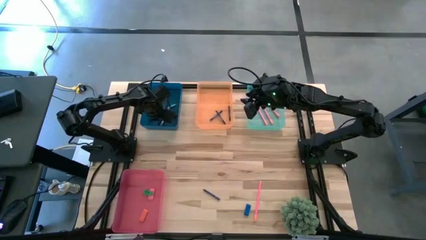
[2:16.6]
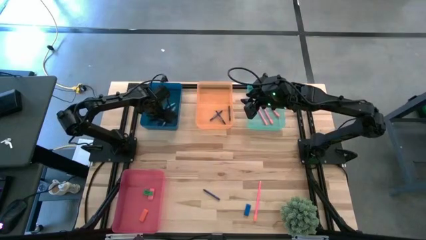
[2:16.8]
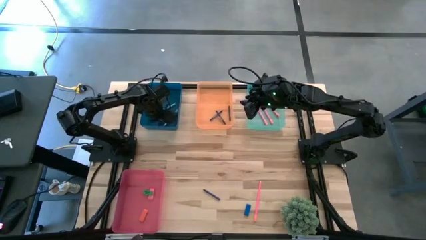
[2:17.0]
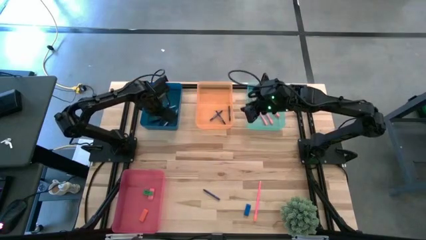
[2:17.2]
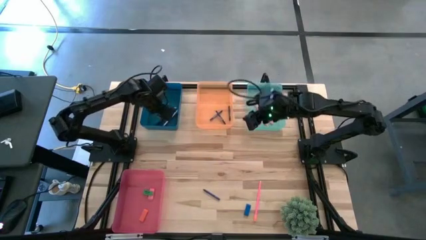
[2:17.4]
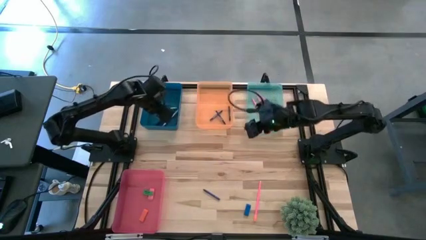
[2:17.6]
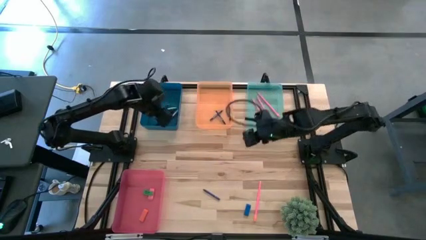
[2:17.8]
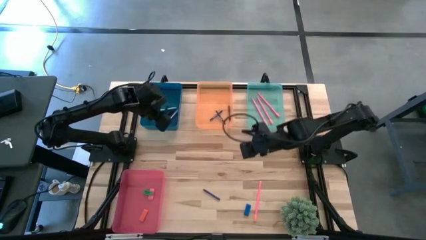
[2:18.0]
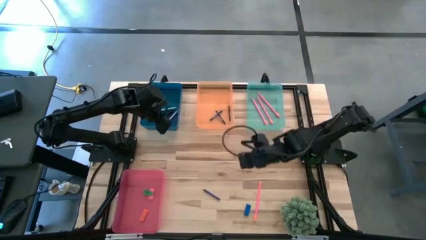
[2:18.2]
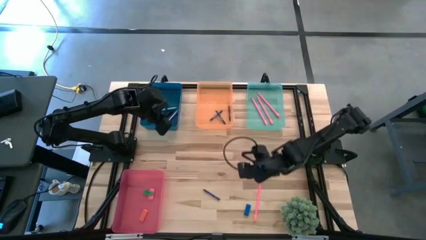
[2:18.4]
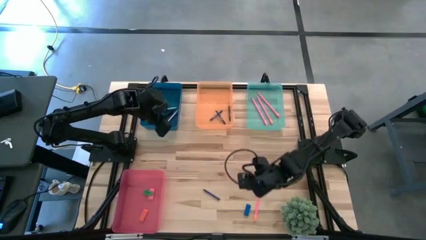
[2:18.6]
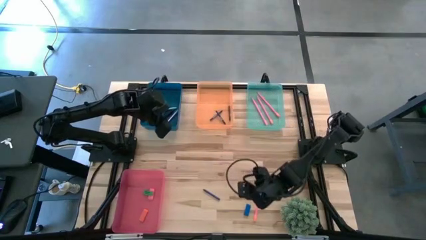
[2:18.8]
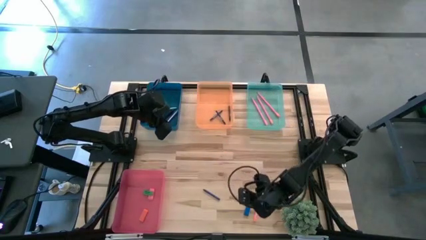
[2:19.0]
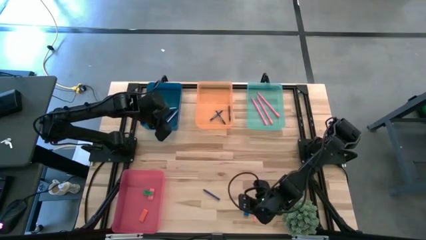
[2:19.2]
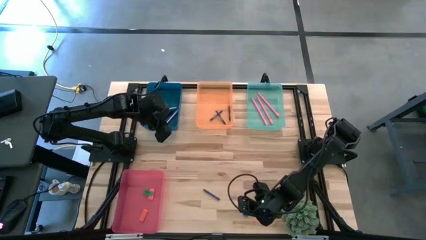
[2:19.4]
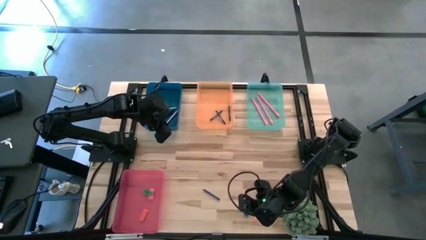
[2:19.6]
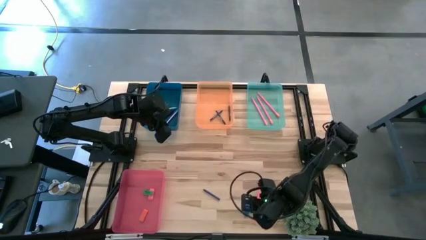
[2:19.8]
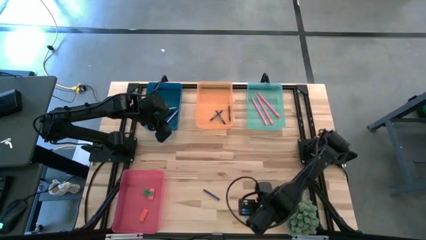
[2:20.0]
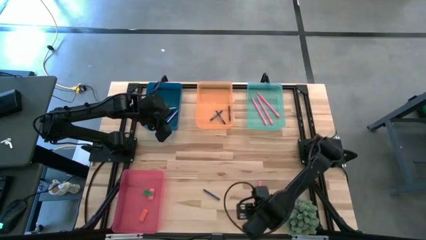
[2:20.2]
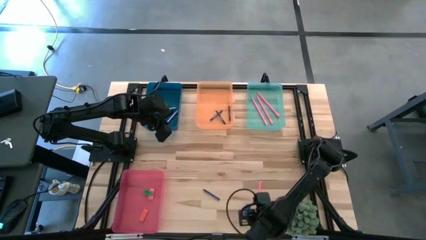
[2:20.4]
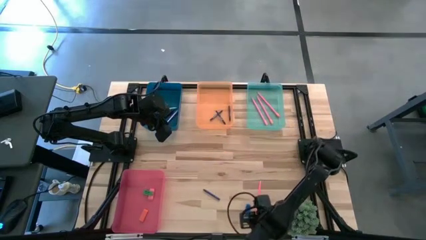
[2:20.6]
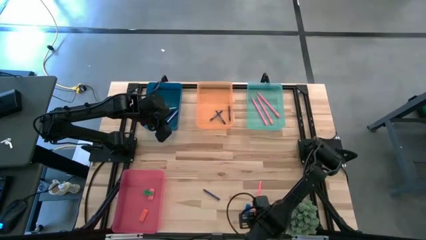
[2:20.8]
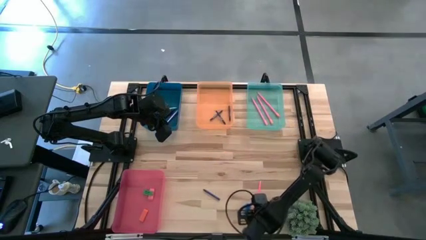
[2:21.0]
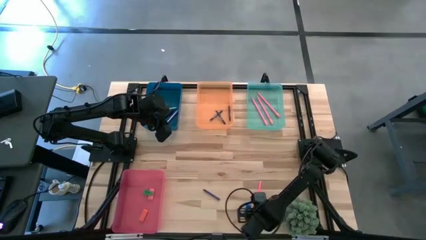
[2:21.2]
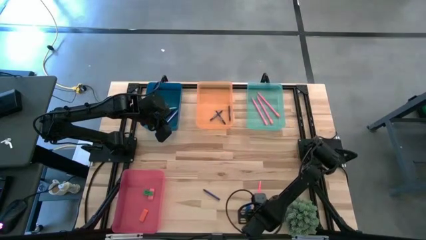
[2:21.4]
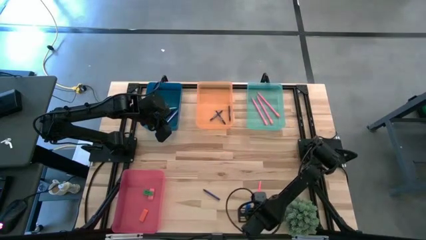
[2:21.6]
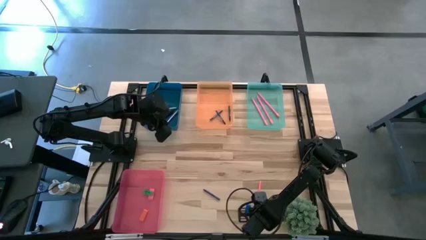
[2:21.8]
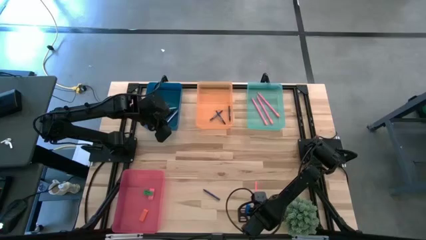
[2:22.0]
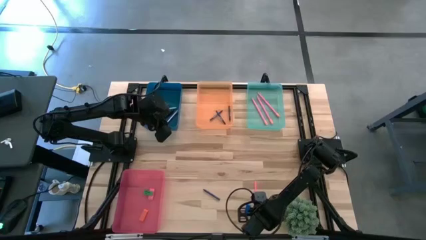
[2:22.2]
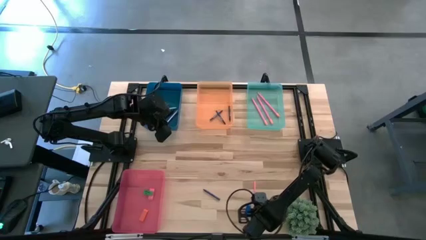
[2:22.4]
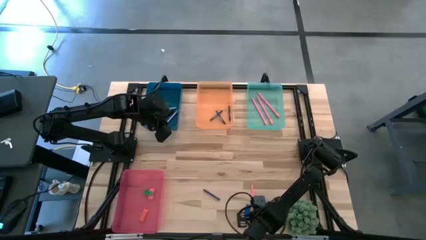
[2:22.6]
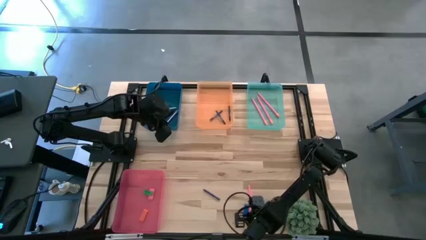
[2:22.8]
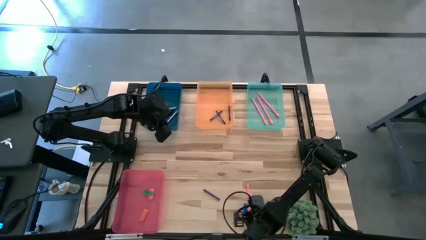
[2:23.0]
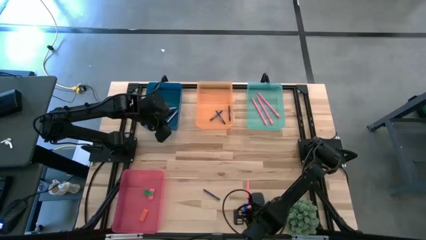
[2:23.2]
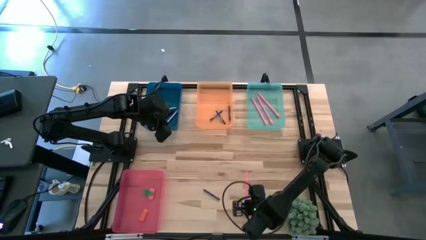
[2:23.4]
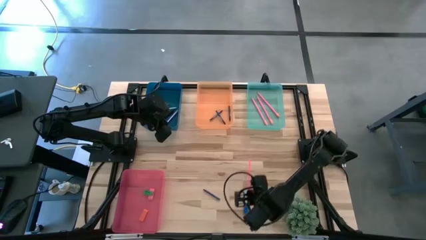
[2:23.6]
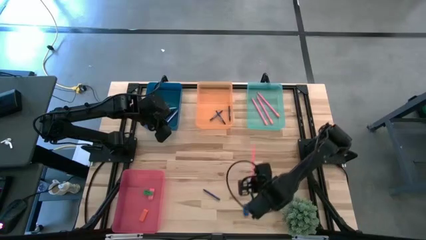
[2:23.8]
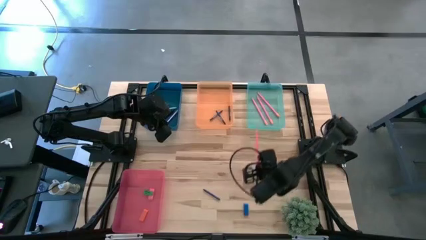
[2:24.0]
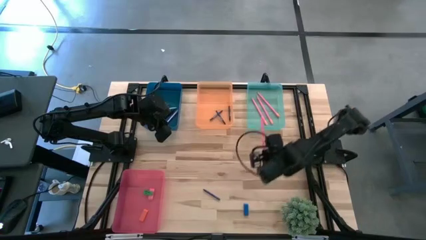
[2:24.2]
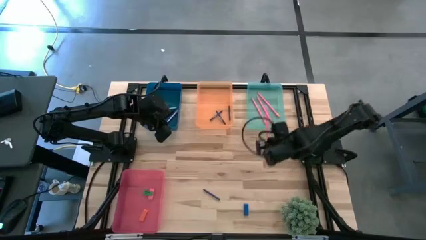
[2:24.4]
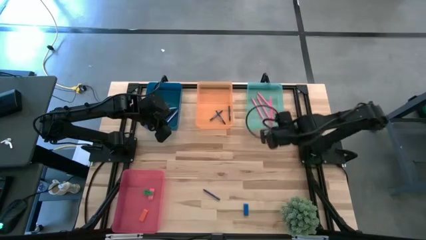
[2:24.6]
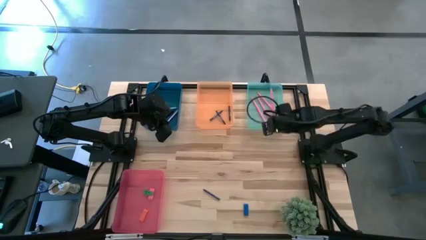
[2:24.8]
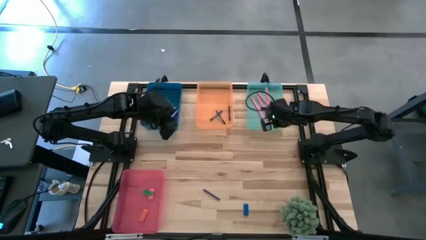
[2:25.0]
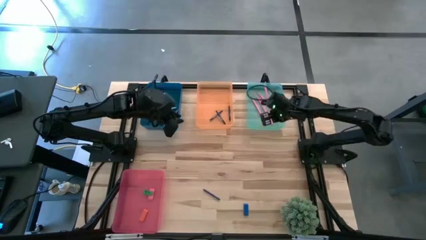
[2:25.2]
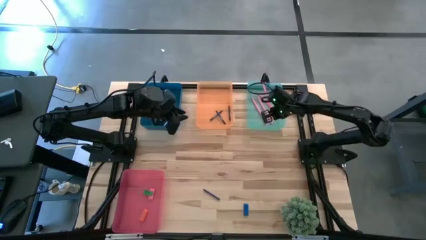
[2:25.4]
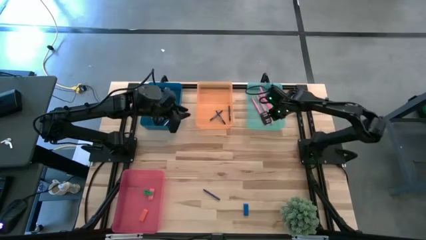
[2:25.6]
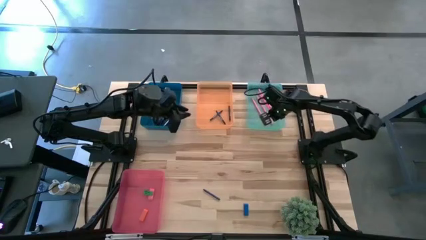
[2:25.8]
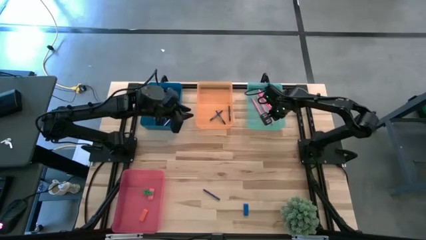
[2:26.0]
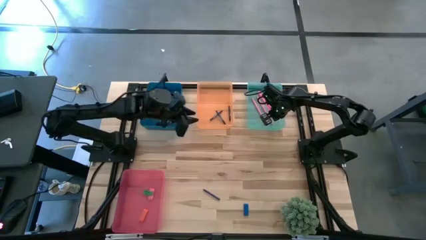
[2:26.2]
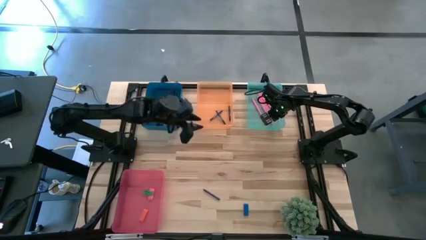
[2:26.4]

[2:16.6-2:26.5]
Task: Sort crayons/erasers/pens/pencils in bins
Put the pink pencil into the light blue bin

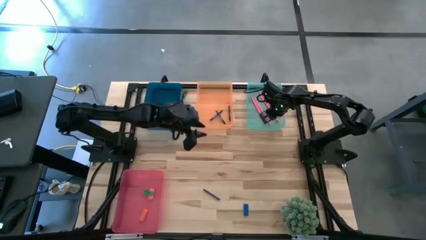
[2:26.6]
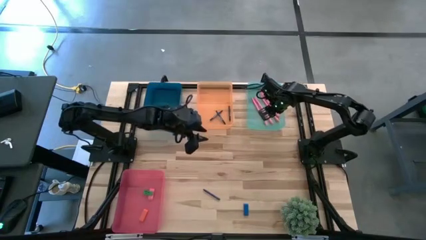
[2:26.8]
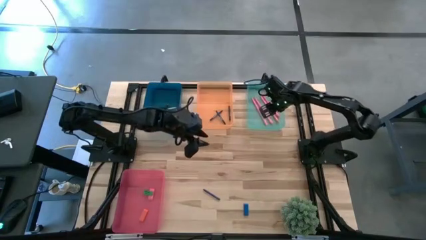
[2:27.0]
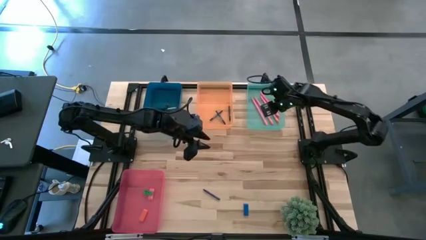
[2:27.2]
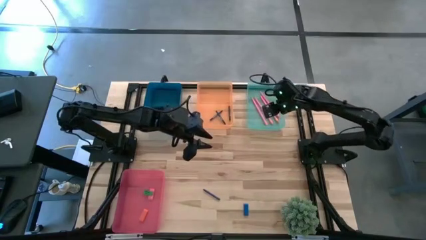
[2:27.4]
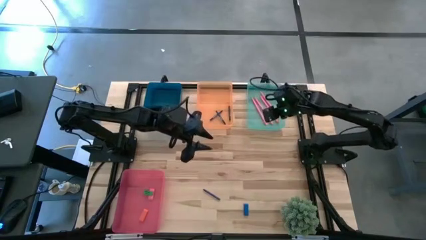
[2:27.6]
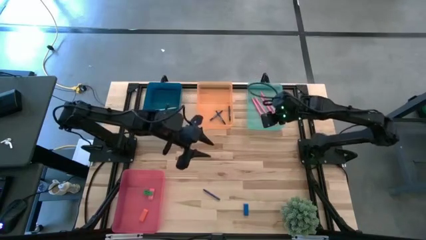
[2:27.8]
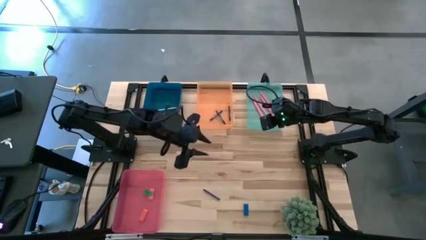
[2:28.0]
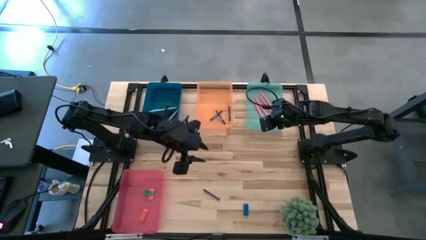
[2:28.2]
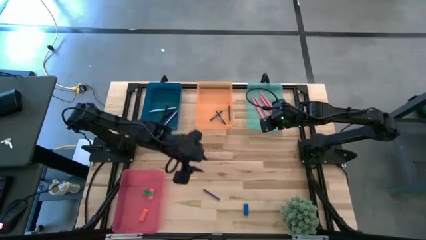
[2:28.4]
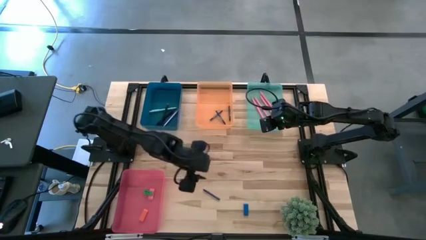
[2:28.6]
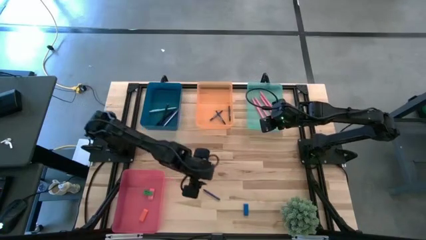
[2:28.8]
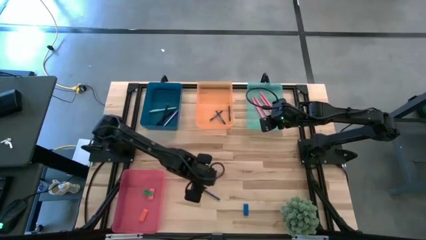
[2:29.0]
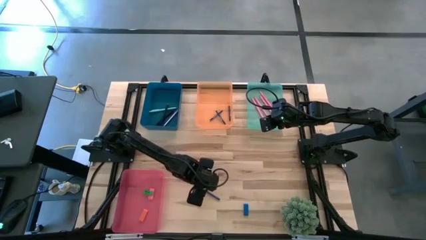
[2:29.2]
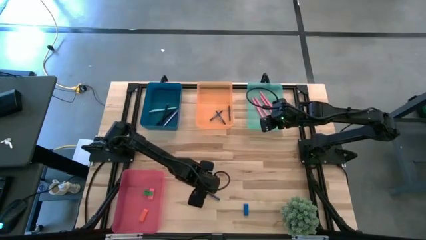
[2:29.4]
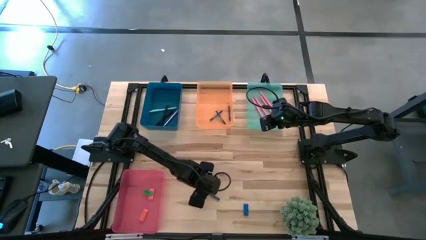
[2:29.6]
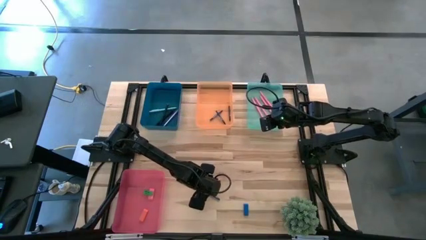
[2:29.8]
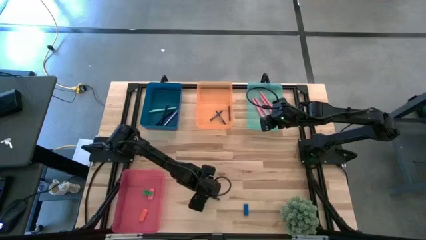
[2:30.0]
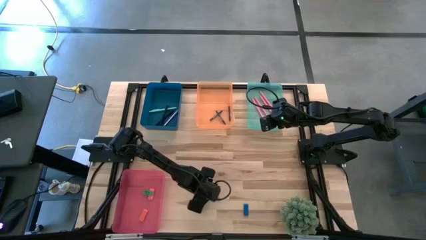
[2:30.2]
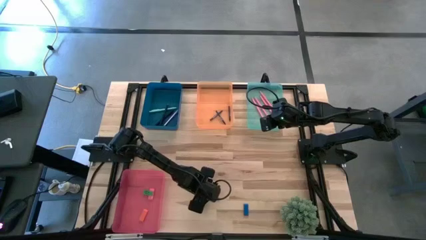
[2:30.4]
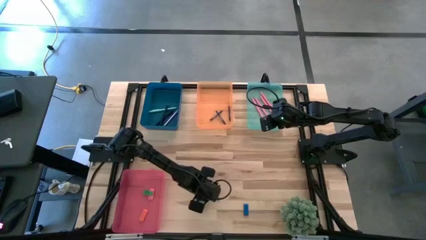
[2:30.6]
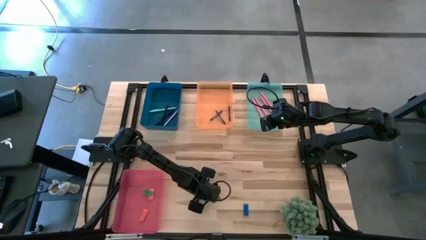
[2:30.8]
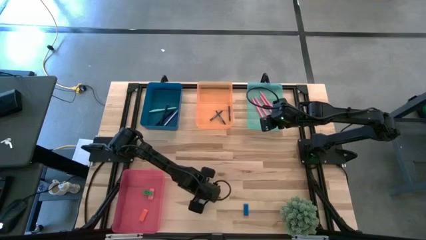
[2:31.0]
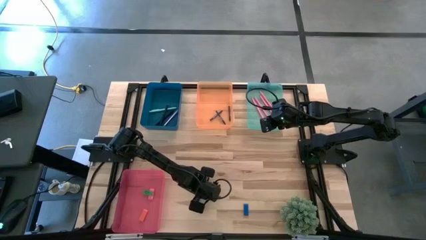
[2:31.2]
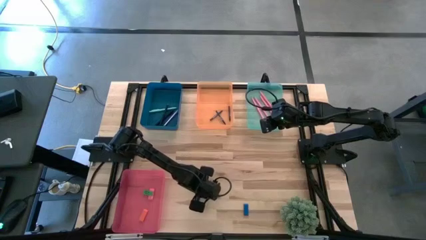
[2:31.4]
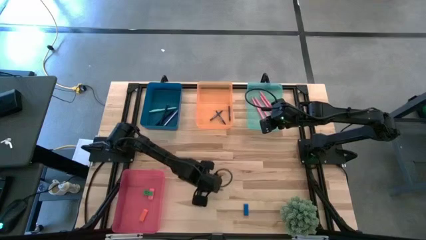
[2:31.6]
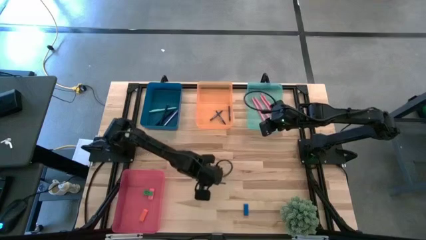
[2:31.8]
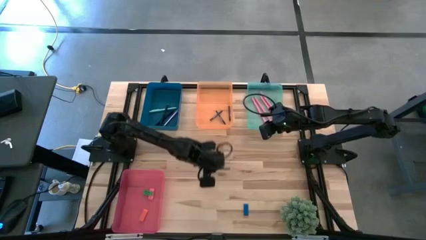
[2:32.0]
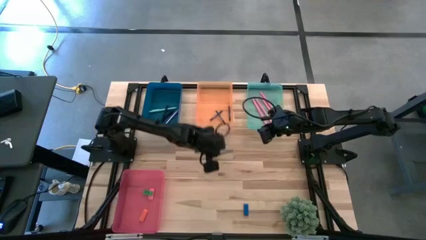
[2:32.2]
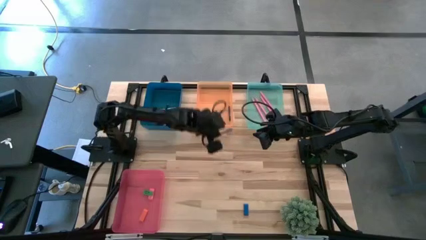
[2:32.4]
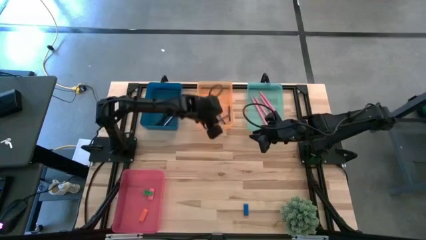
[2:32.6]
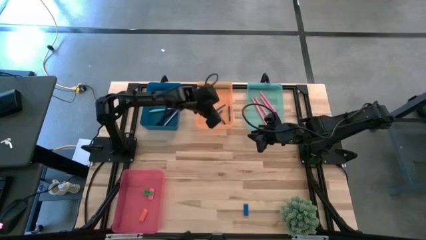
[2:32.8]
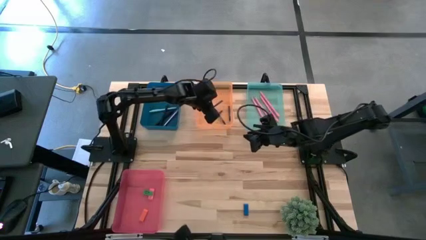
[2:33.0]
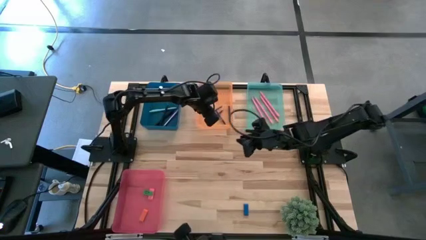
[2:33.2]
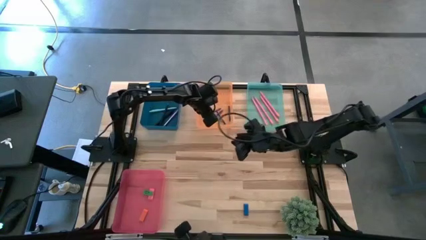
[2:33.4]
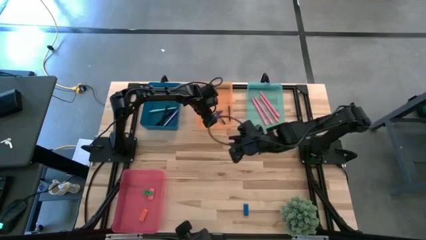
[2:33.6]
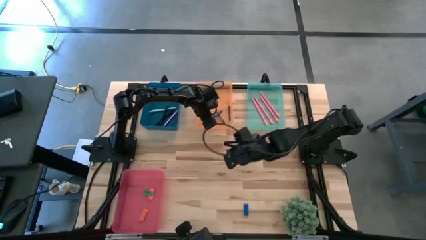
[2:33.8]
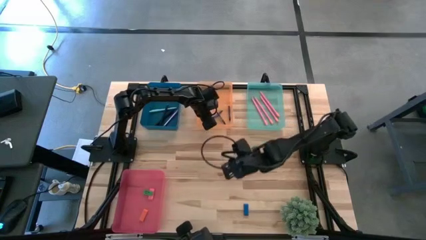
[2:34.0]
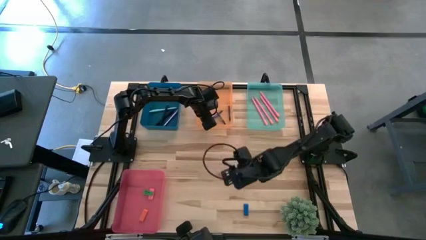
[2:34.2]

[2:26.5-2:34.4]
Put the blue crayon into the orange bin
